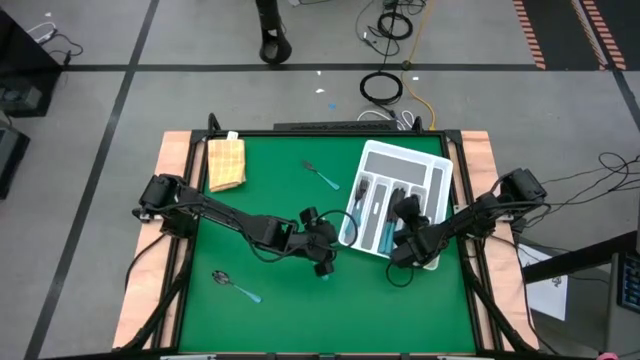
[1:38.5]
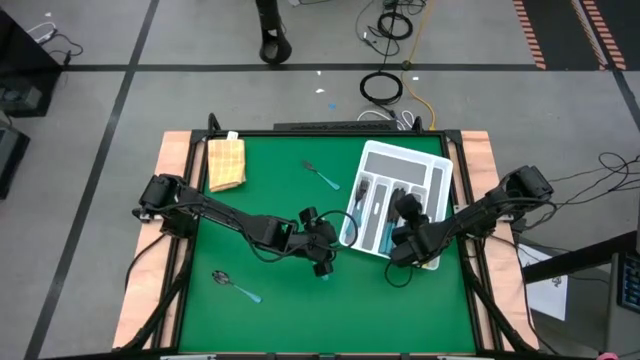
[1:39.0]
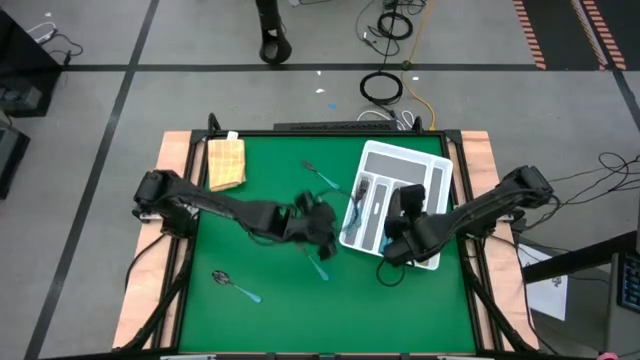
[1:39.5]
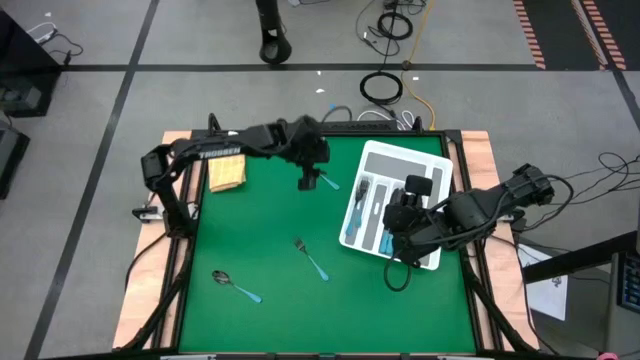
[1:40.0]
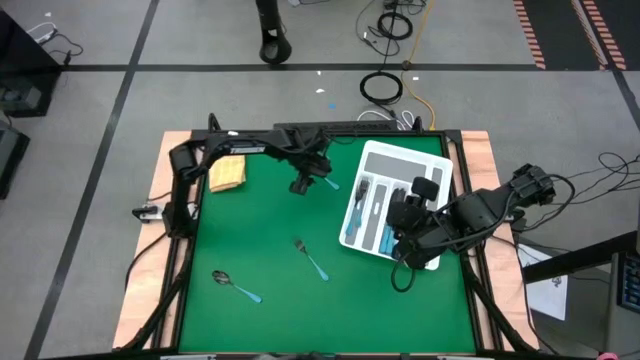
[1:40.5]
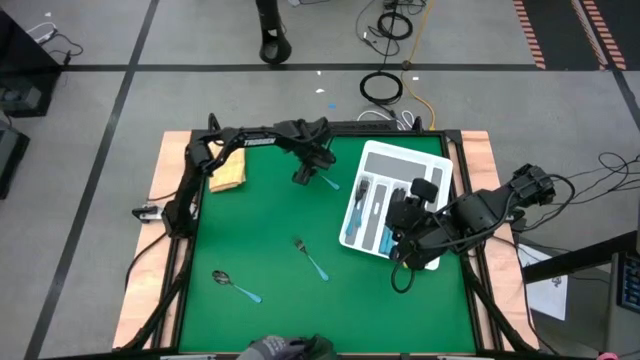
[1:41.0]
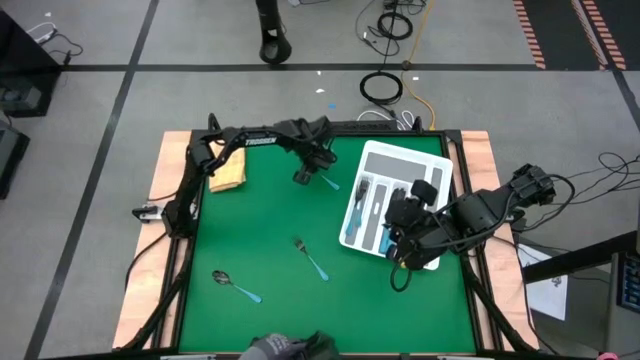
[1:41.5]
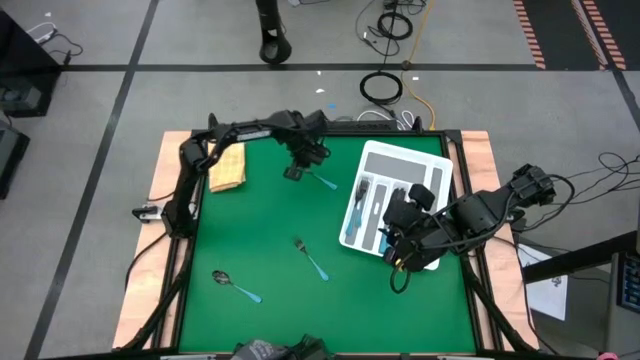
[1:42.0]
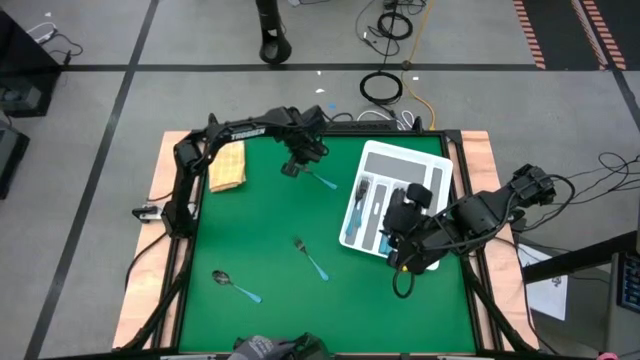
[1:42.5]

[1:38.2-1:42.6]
Task: Sort silverware
Put the top blue fork into the tray

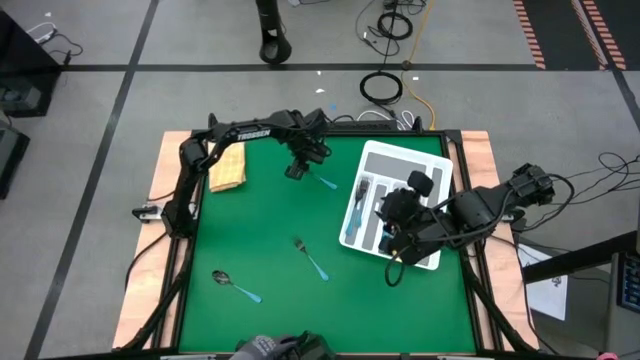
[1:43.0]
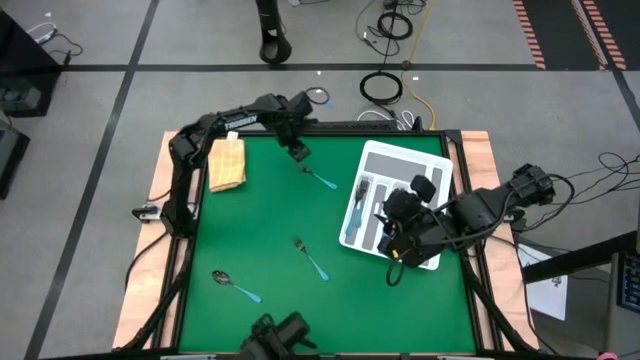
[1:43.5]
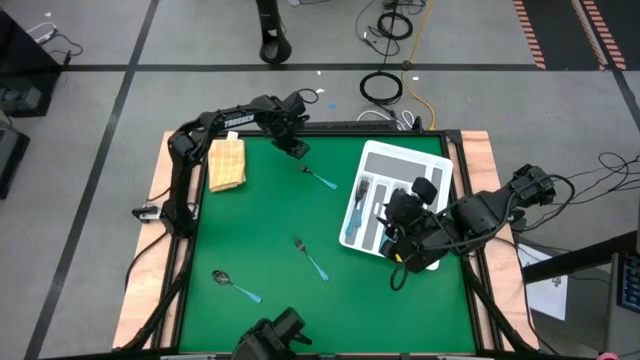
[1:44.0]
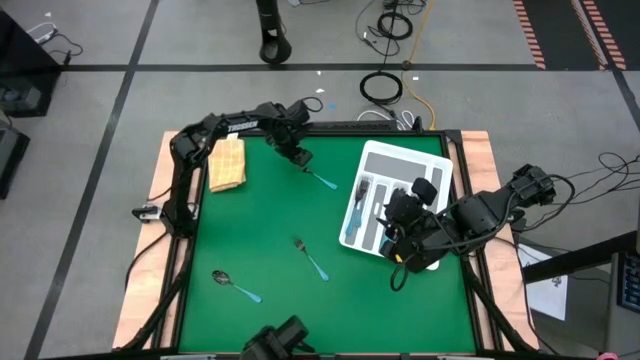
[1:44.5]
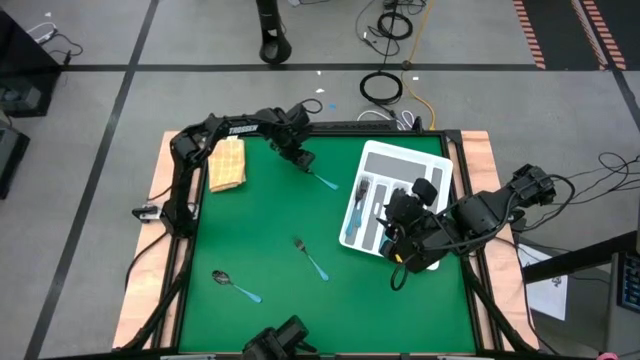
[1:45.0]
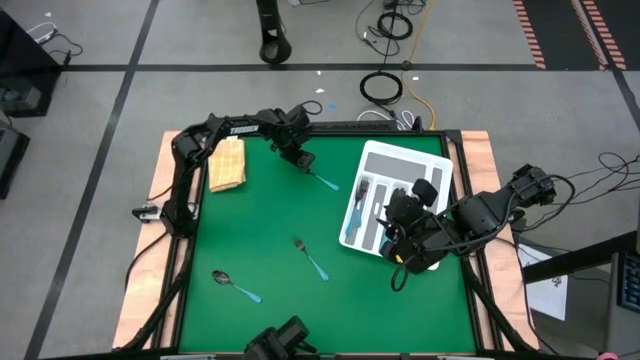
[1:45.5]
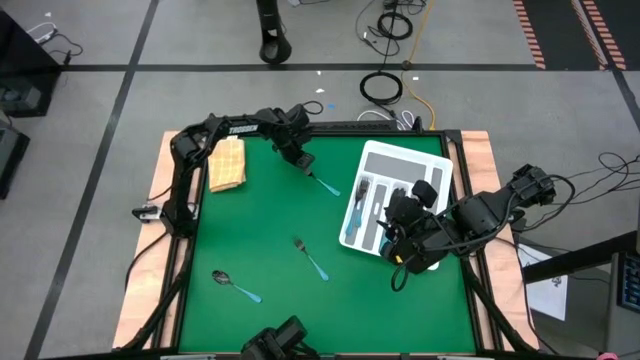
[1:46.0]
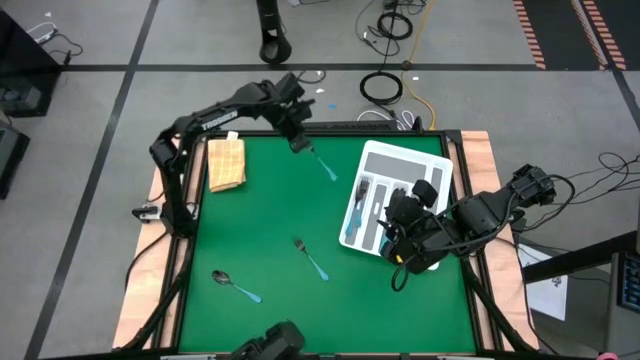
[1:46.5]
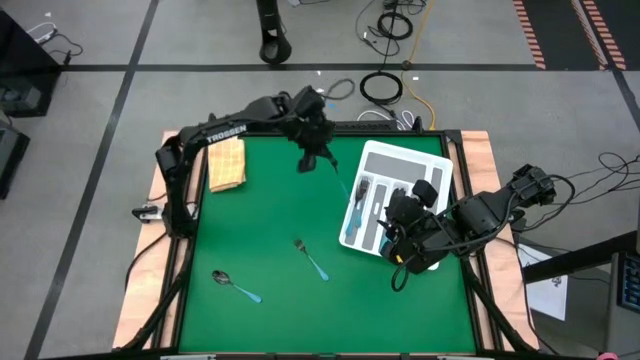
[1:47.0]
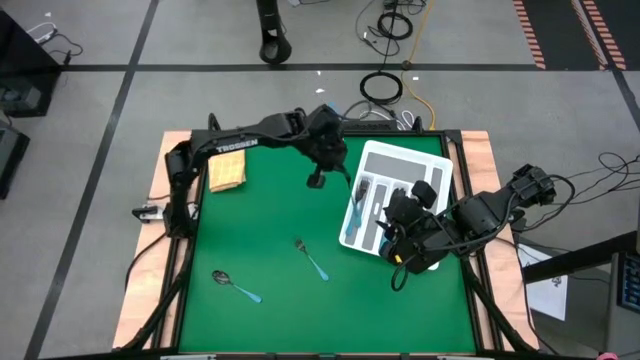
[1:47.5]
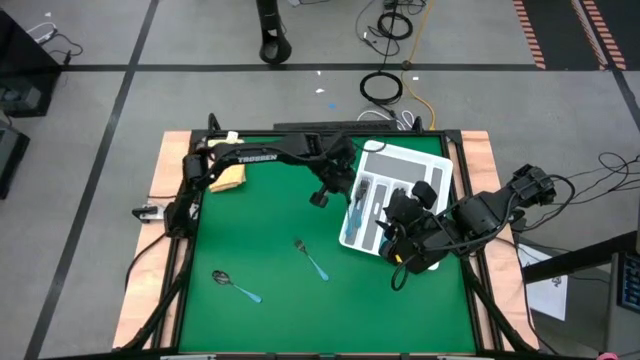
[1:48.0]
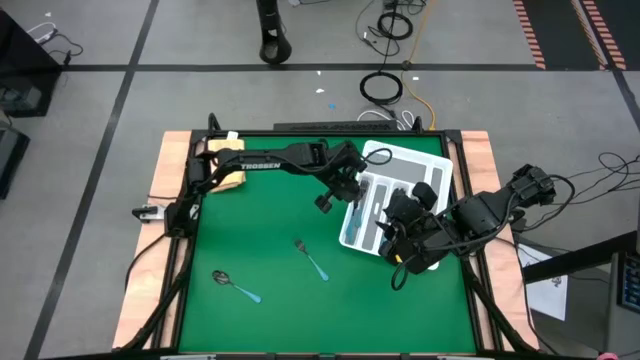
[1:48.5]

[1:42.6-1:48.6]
Put the top blue fork into the tray

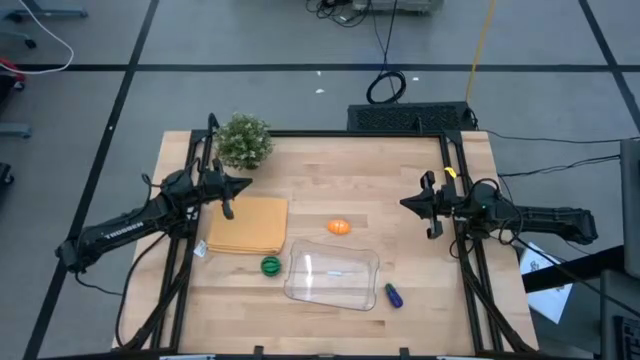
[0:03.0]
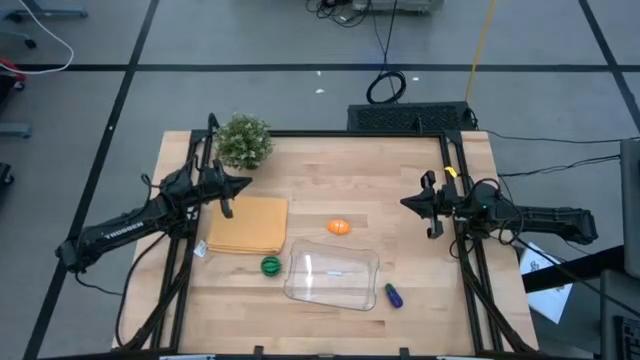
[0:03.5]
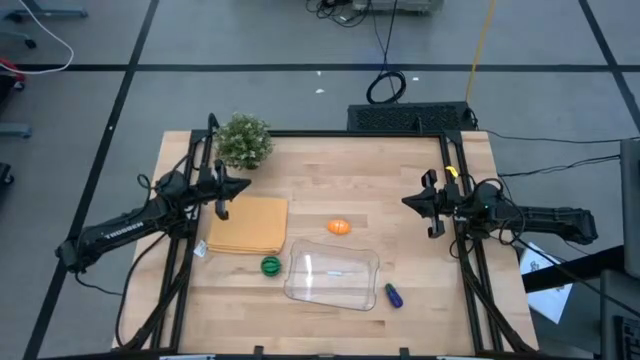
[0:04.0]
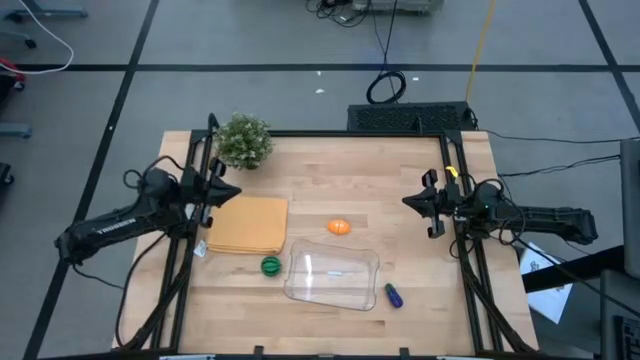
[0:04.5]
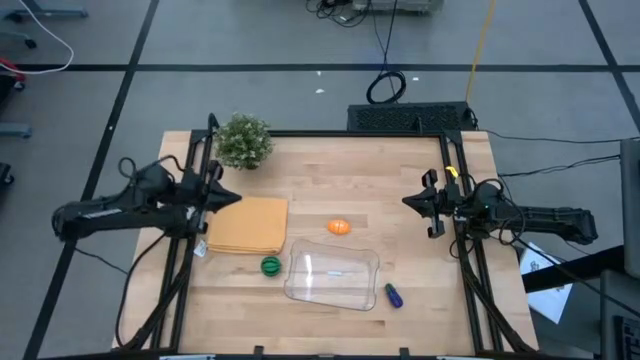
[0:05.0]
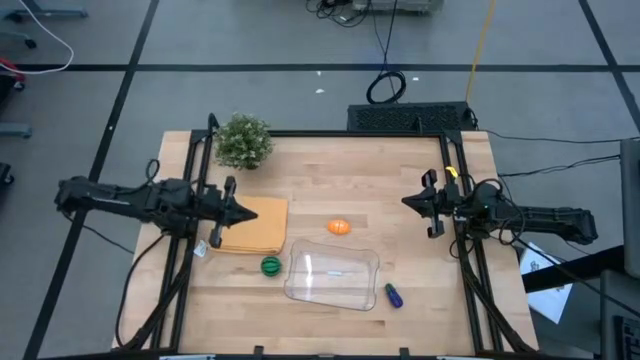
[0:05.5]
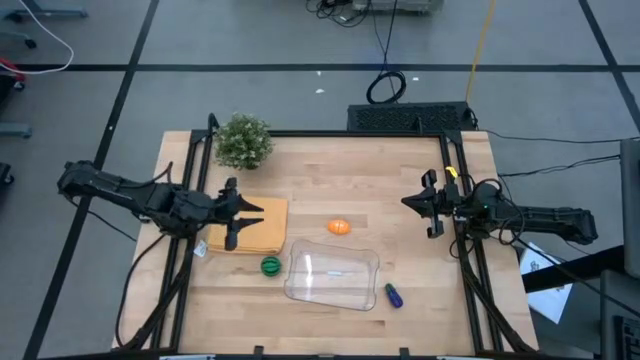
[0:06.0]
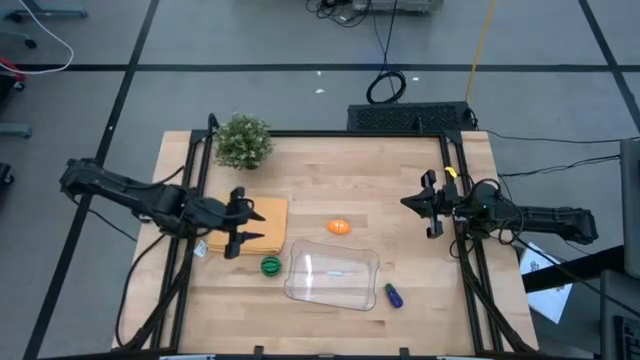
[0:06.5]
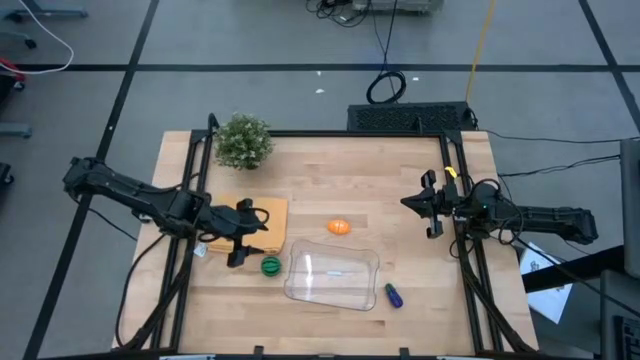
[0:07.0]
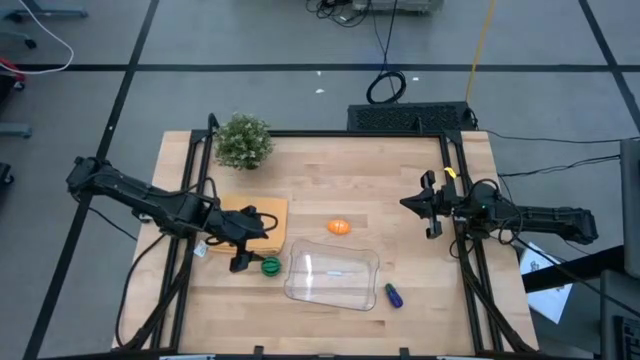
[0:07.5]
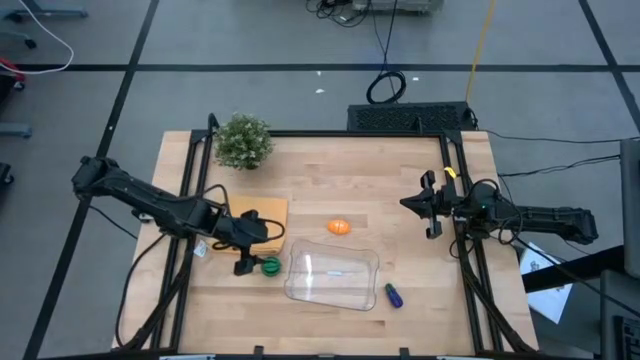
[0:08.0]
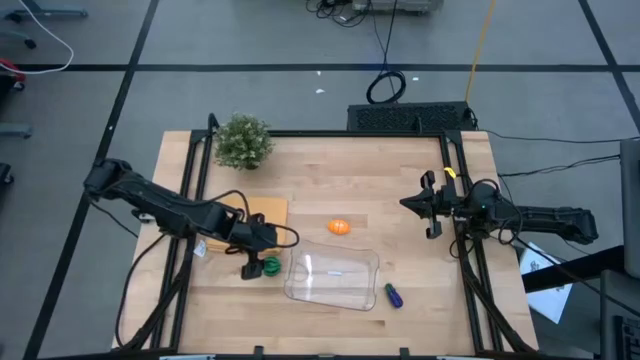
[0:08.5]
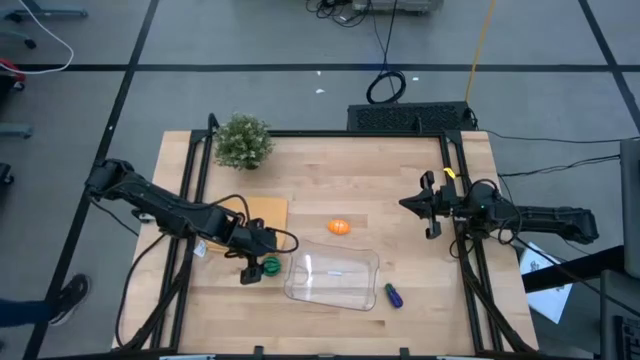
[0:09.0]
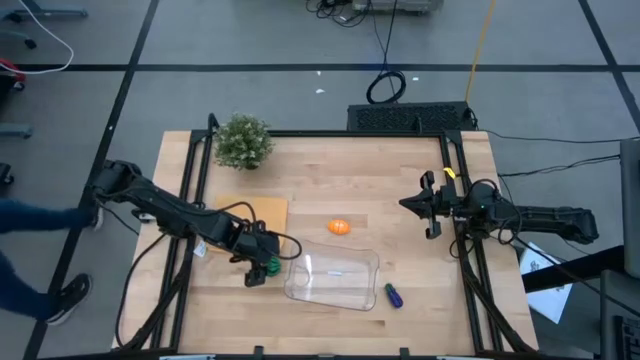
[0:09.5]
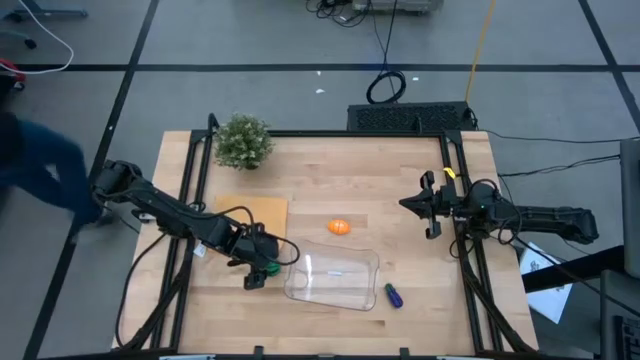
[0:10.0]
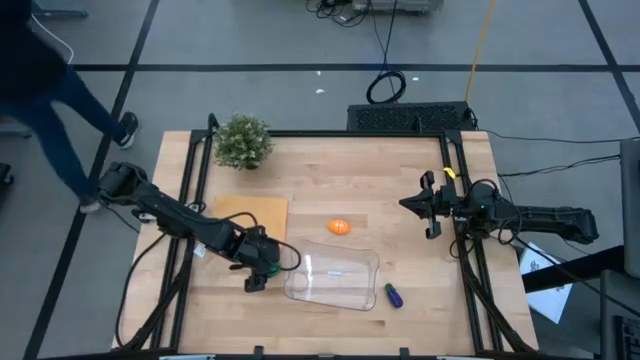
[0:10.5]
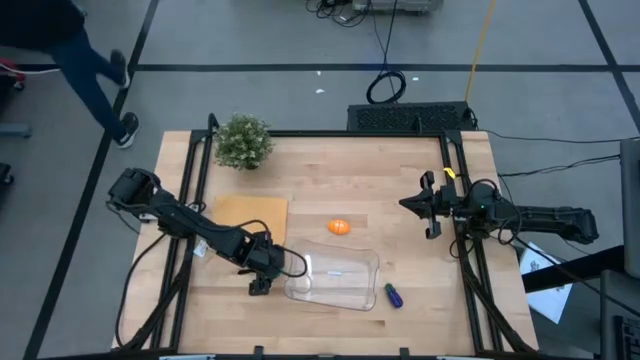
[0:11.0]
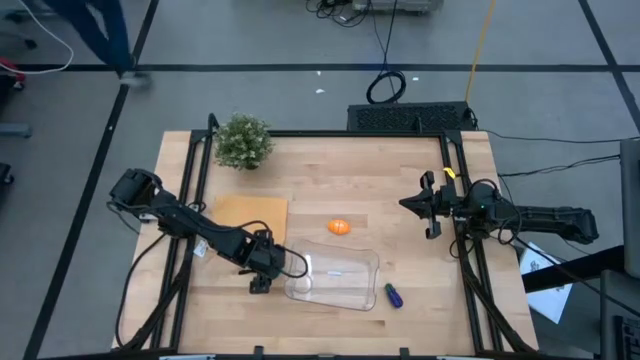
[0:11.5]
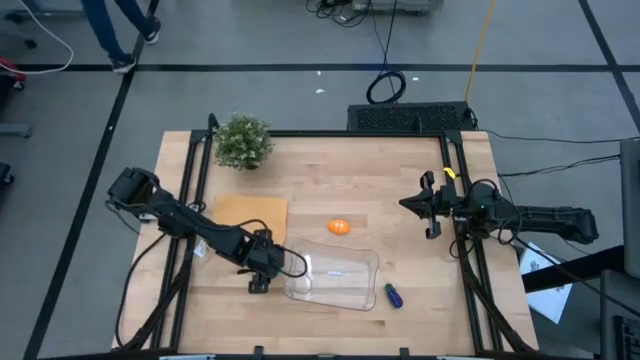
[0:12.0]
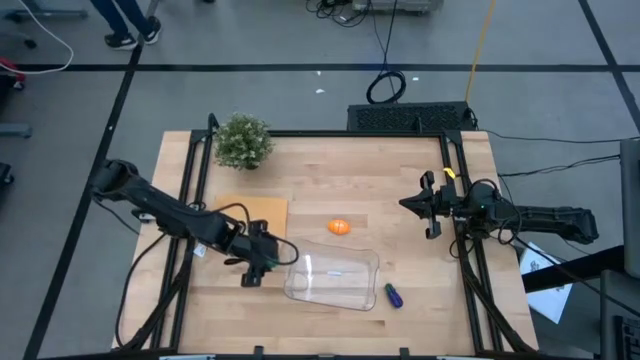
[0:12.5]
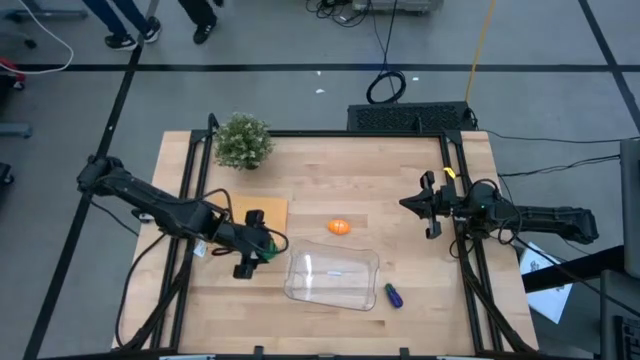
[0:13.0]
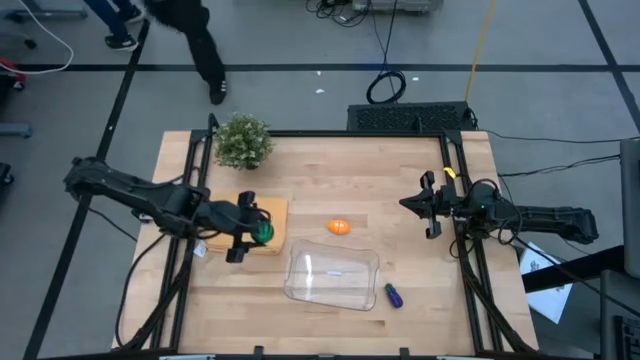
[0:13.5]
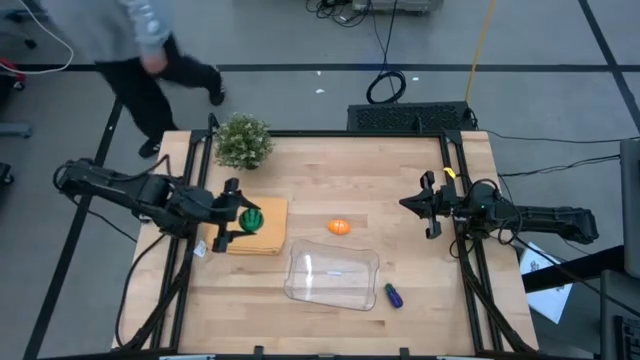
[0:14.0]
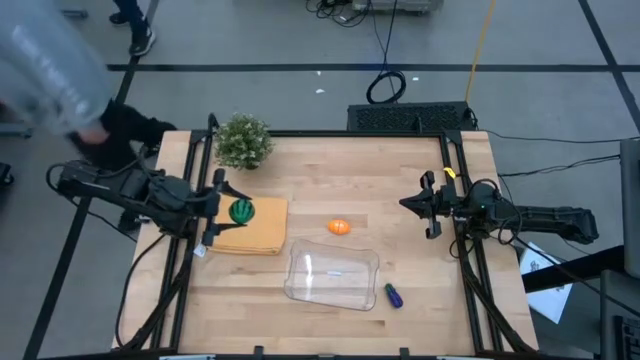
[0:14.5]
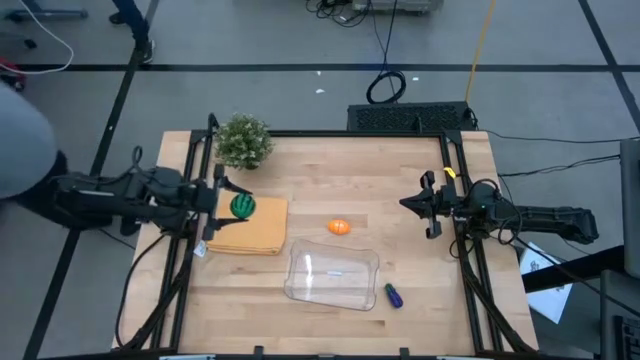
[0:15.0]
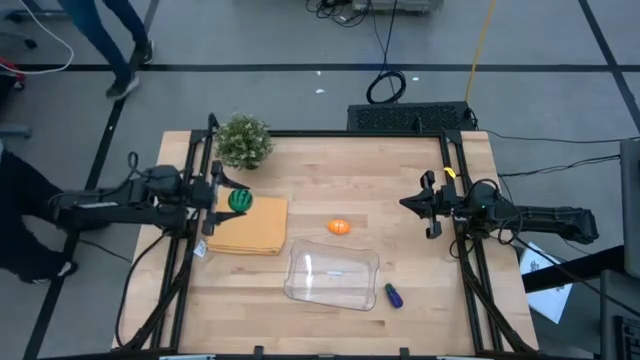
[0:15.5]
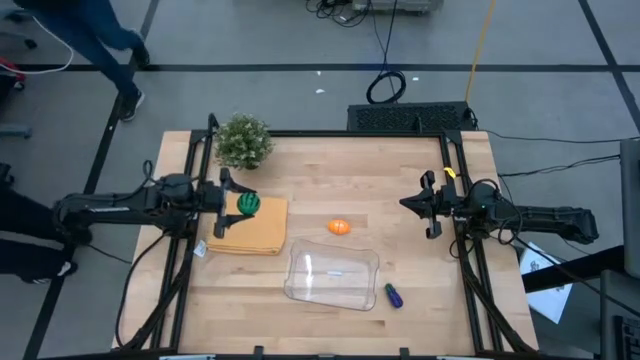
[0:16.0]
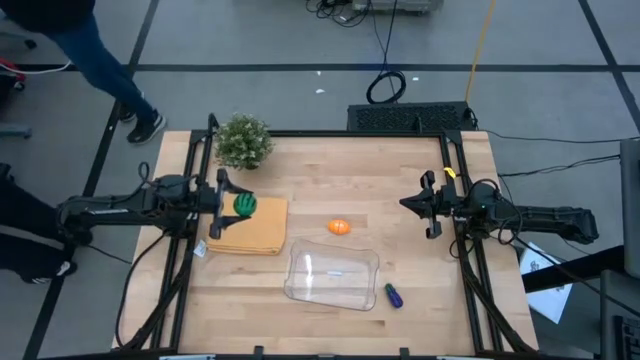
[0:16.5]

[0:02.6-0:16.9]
Task: Pick and placing Produce into tupperware
Put the green watermelon into the transparent bin
